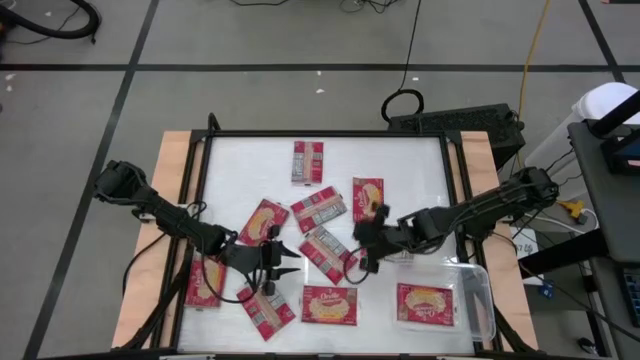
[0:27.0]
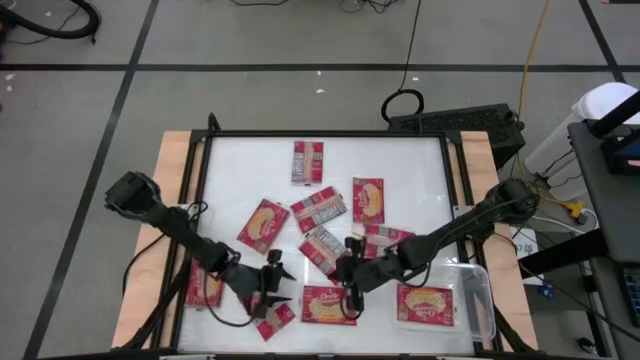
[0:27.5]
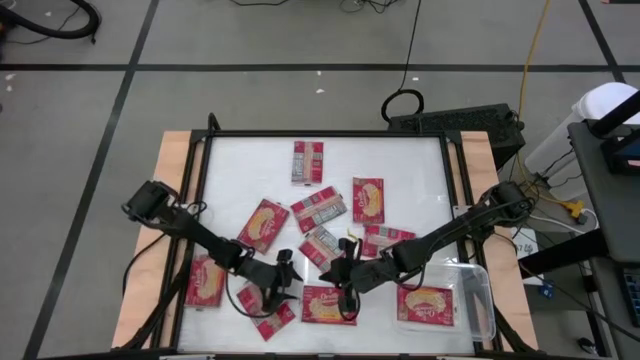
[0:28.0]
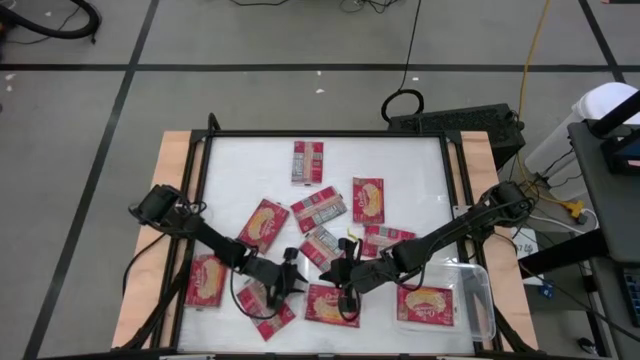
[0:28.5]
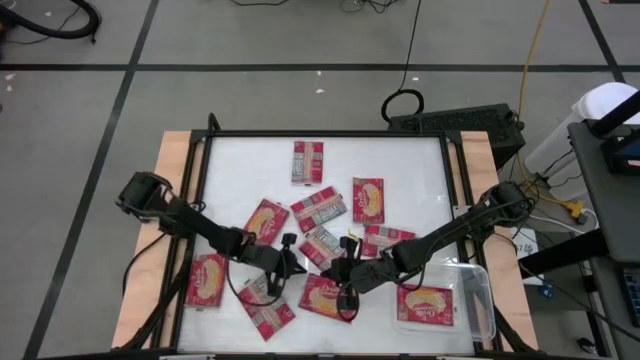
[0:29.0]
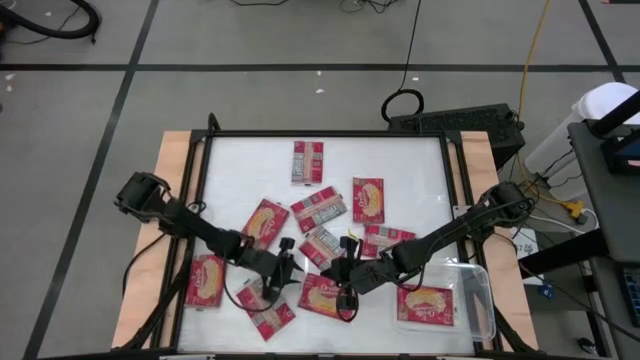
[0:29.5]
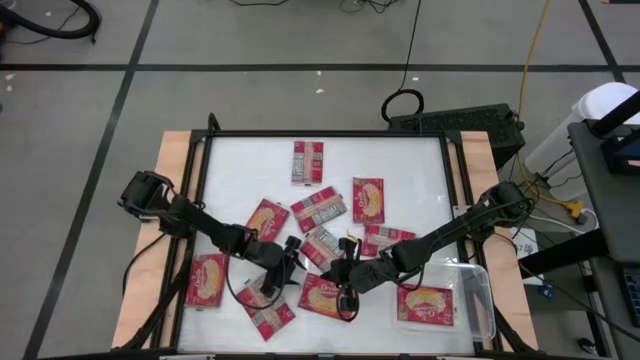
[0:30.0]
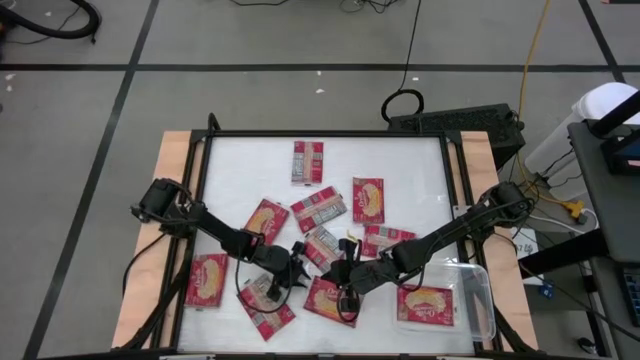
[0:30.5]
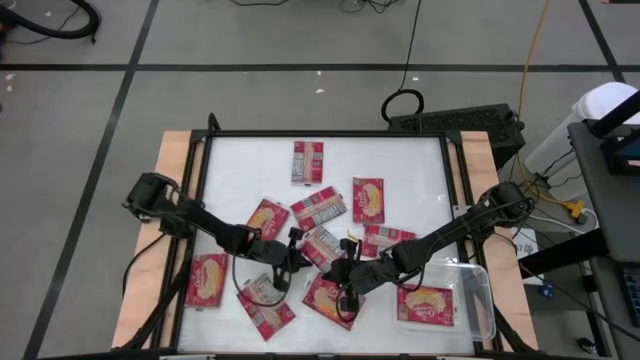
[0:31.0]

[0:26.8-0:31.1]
Task: Sort popcorn bags into baskets
Put the red popcorn pack into the transparent bin

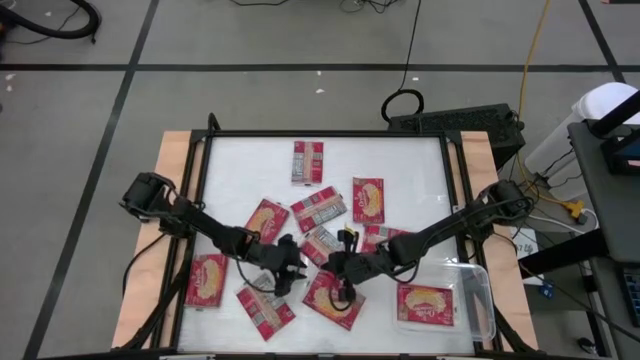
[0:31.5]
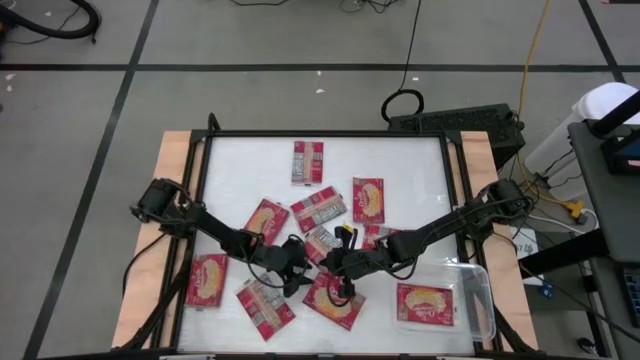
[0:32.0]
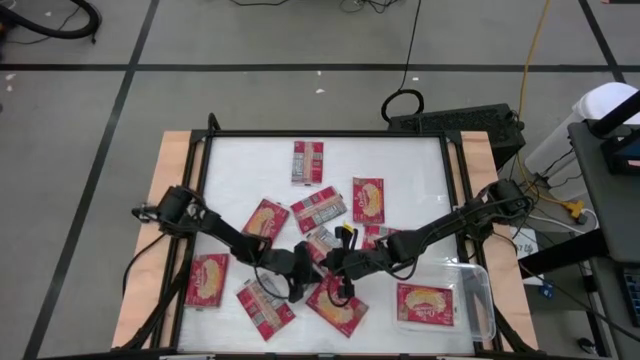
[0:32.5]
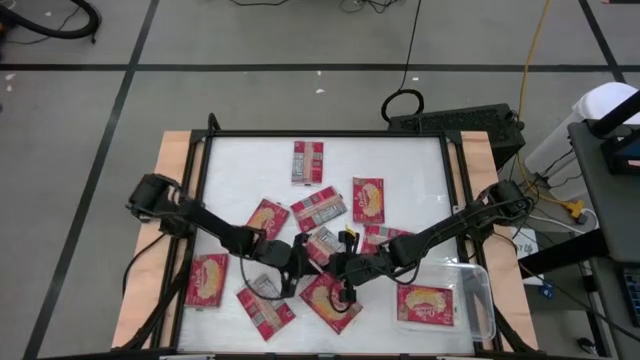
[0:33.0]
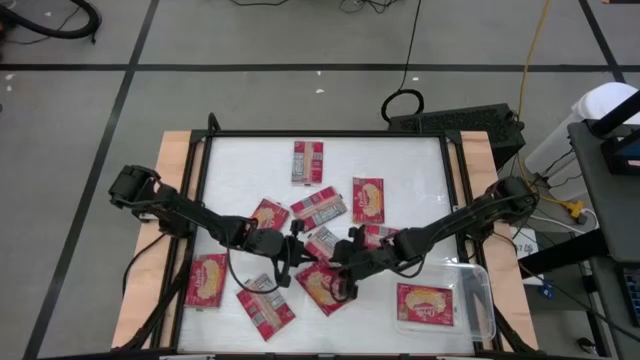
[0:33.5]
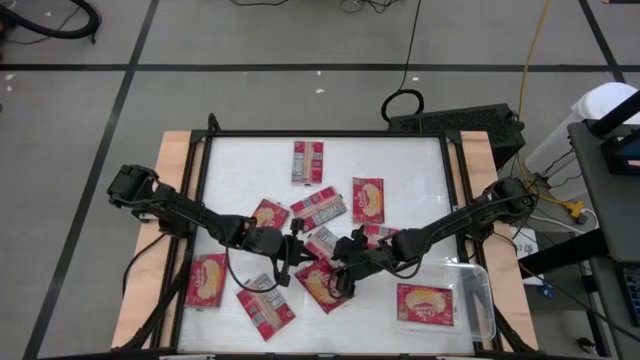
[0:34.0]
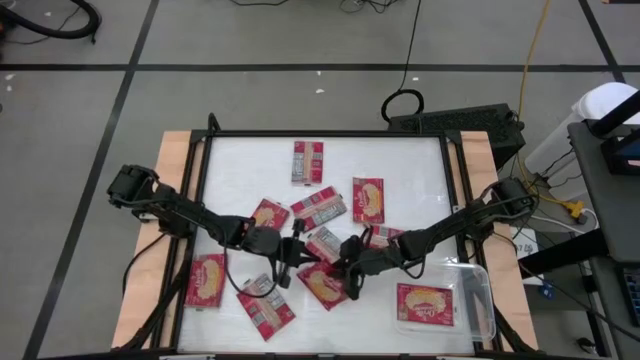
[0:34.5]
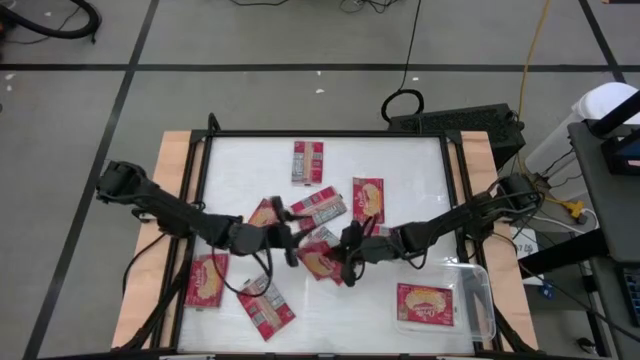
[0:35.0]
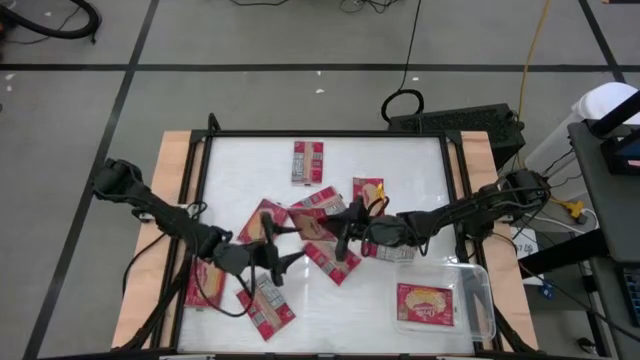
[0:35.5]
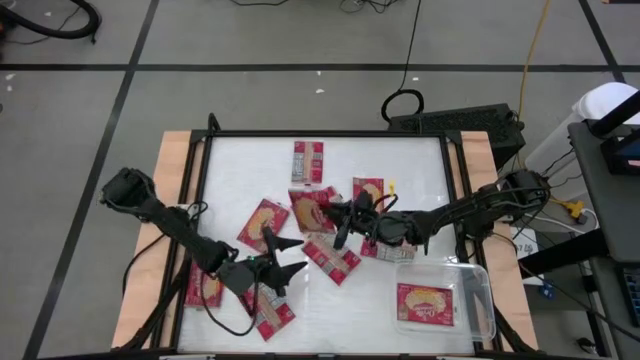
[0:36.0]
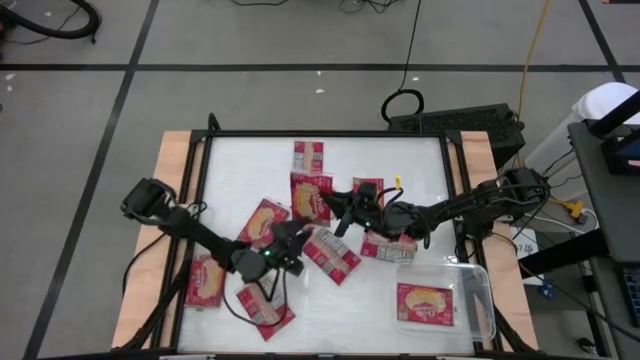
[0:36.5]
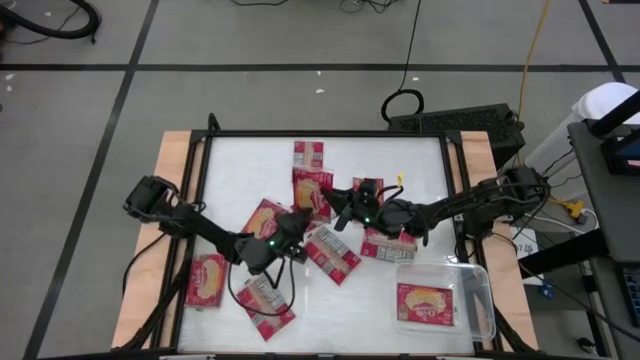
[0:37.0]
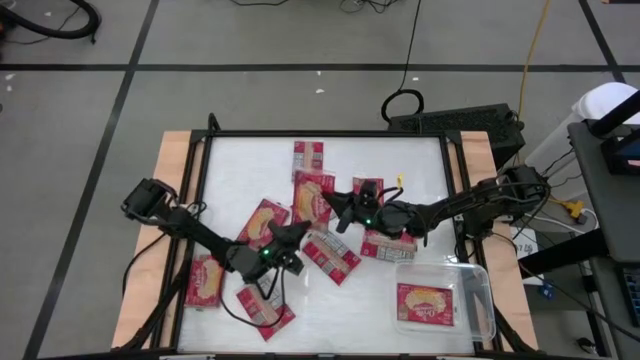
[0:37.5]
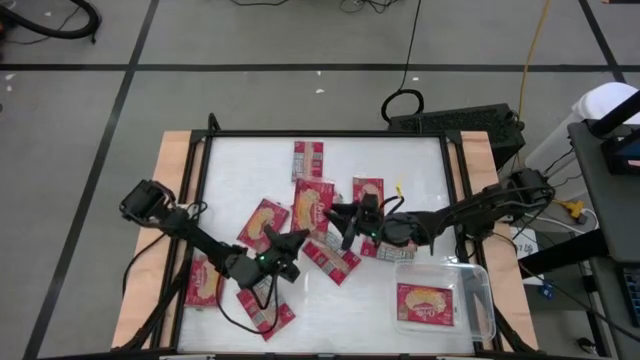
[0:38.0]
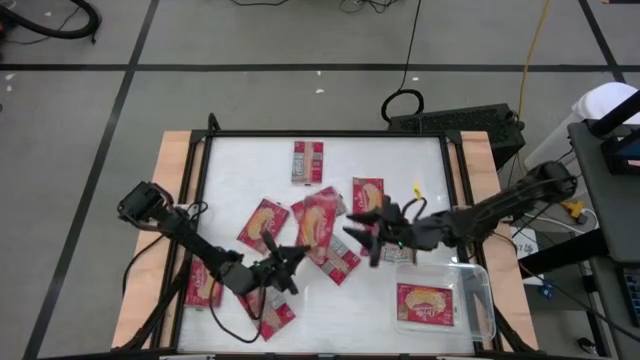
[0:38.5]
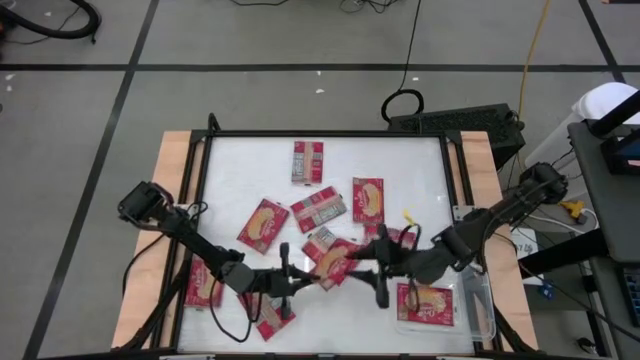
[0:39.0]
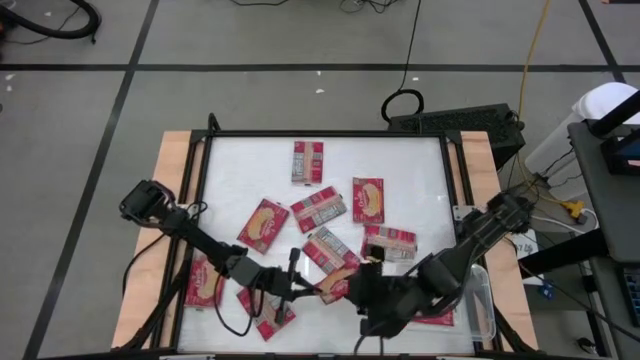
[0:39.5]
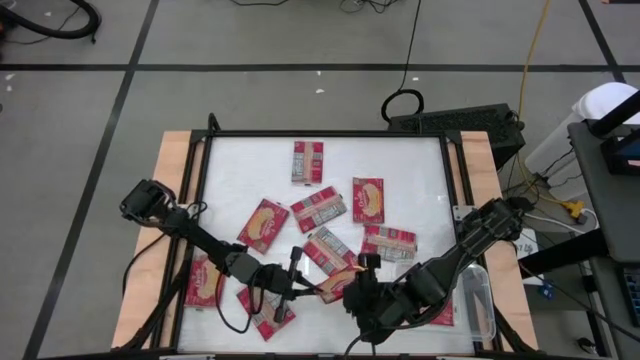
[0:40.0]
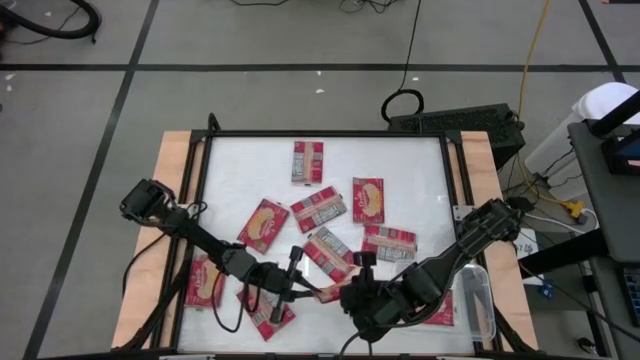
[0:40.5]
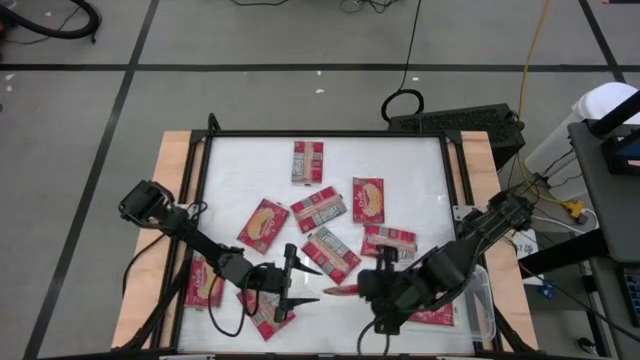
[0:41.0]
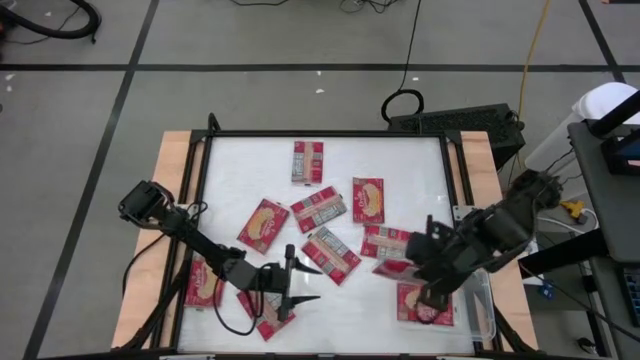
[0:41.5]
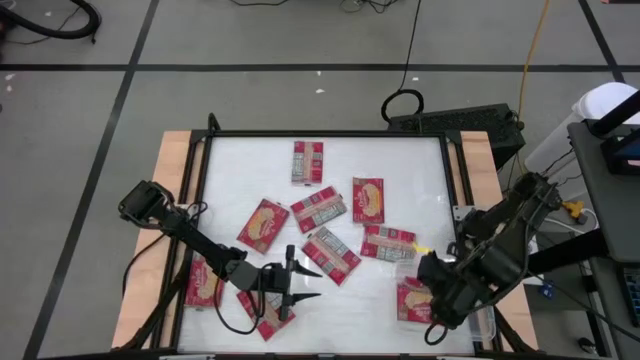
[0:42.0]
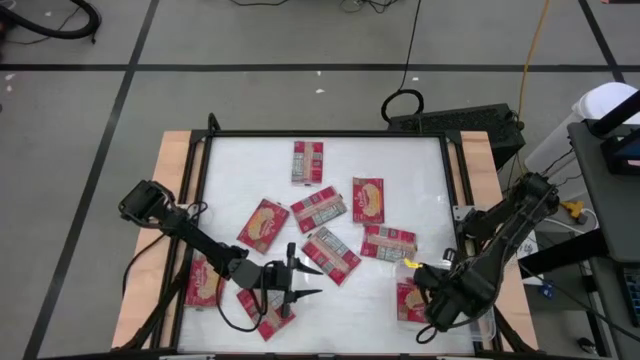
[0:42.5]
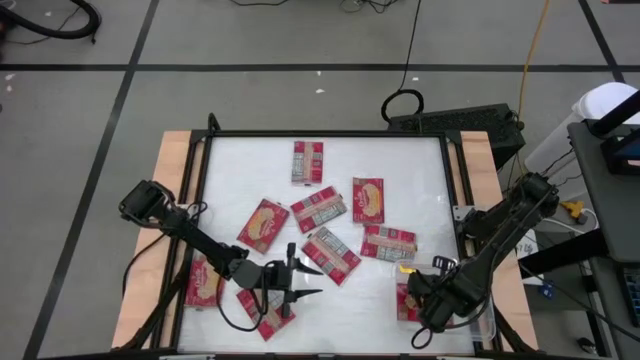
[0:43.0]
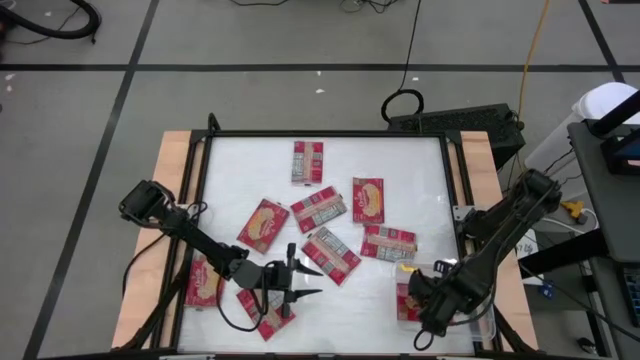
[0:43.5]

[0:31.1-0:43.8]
Put the red popcorn pack into the transparent bin

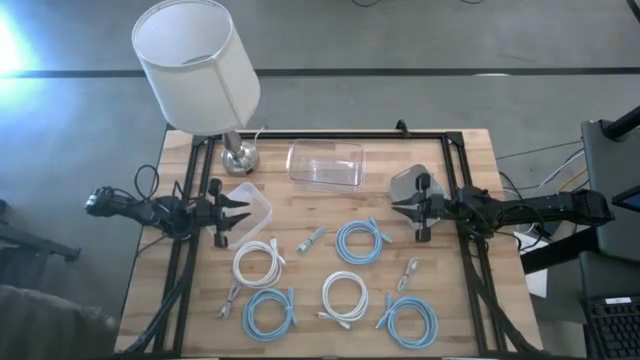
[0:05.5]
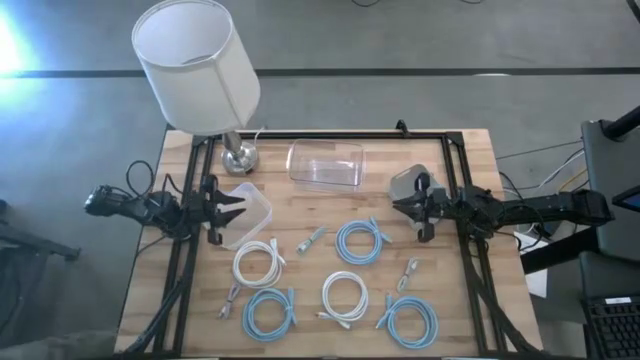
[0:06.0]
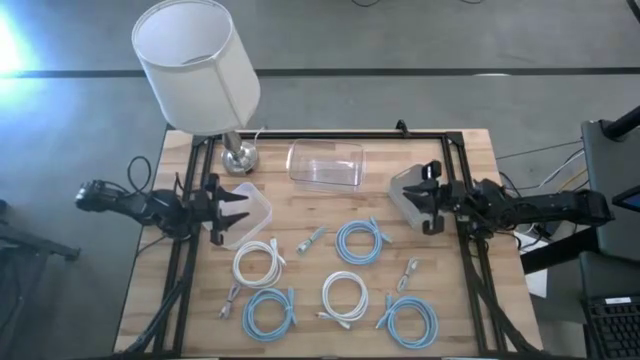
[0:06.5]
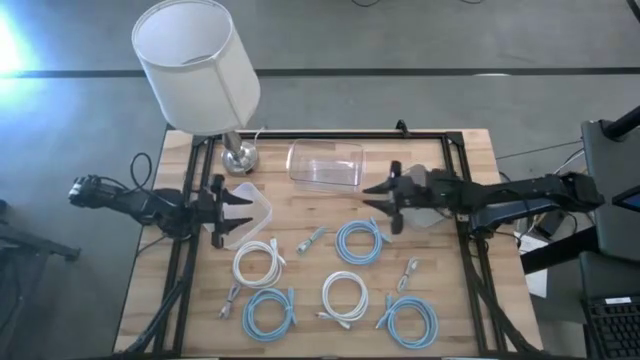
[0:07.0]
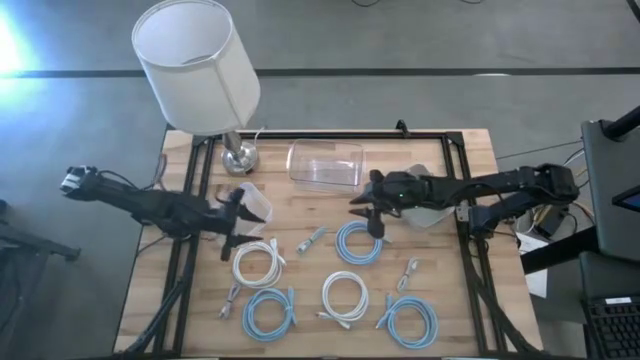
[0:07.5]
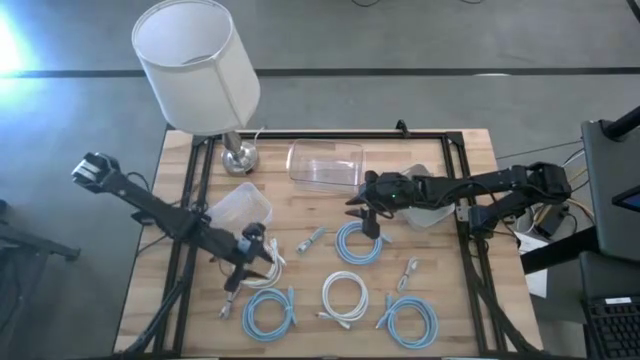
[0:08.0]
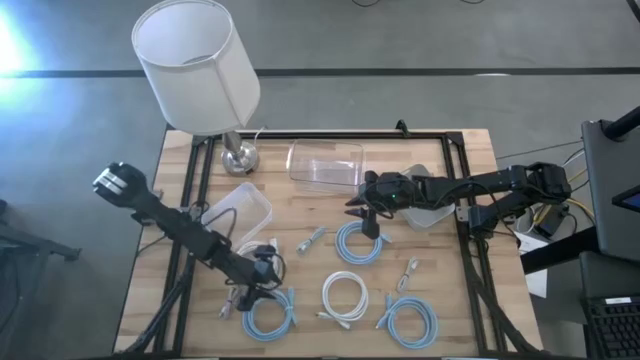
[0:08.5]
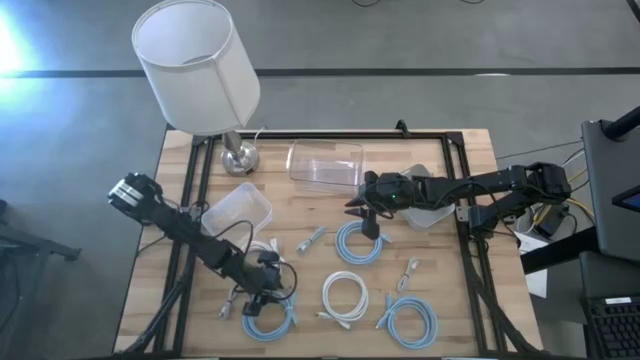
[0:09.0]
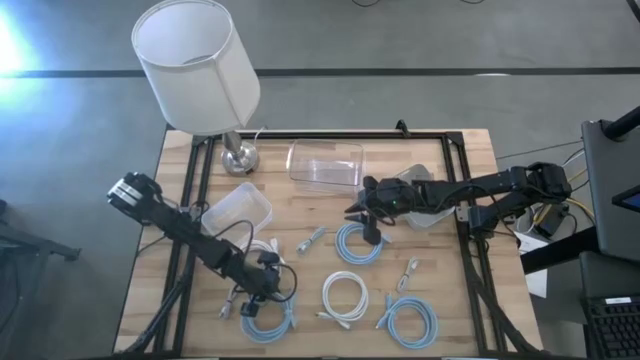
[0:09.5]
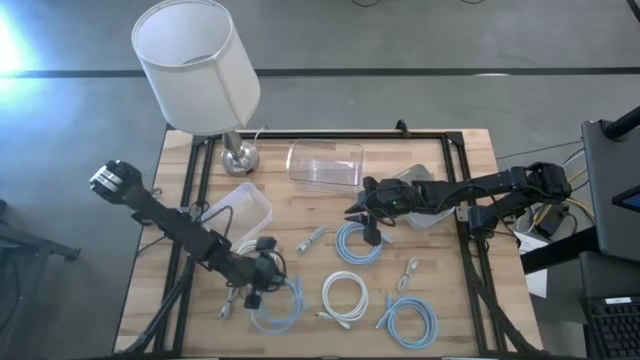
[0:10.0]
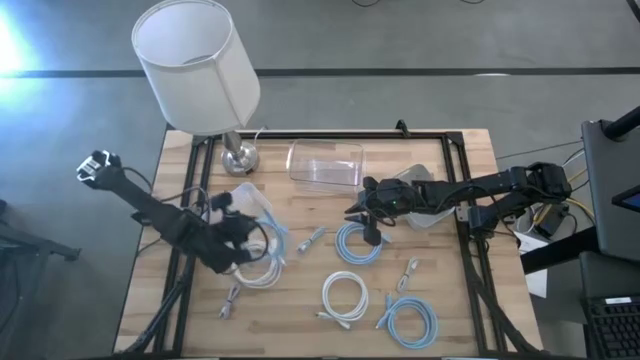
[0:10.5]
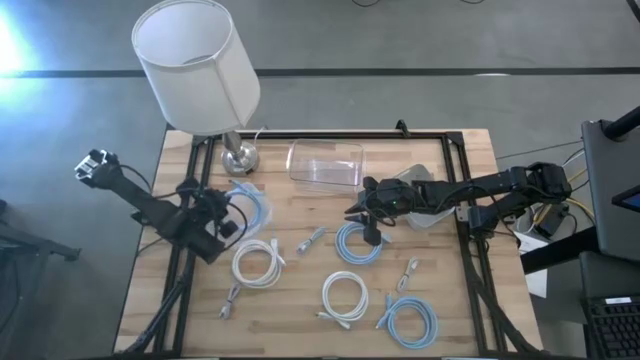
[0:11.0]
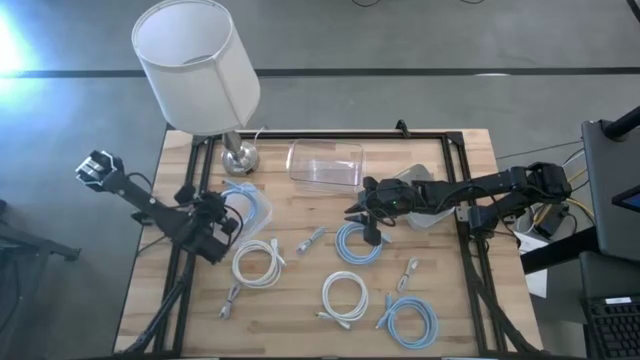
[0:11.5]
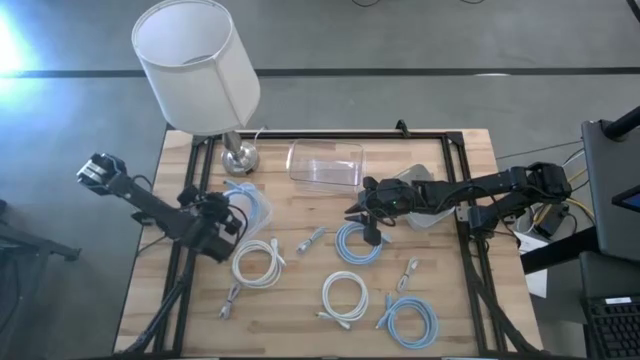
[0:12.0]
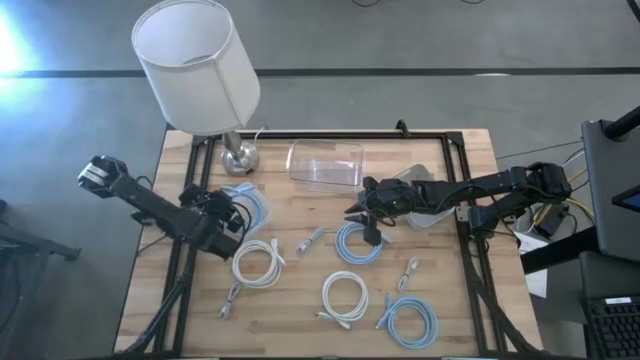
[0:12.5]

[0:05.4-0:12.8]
Task: Pick & Place USB Port
Put the bottom left light blue HDMI cable into the white bin
